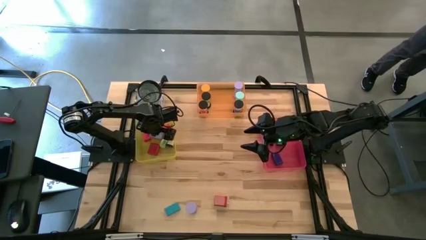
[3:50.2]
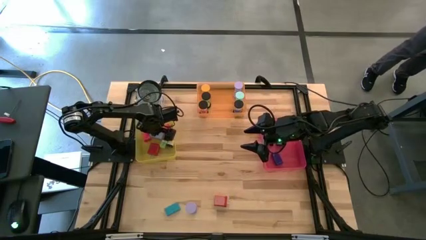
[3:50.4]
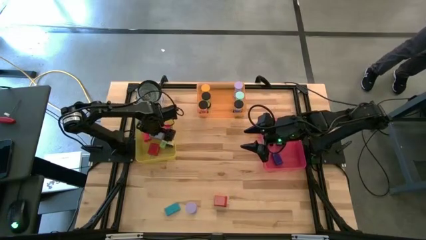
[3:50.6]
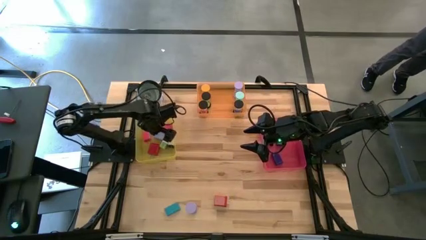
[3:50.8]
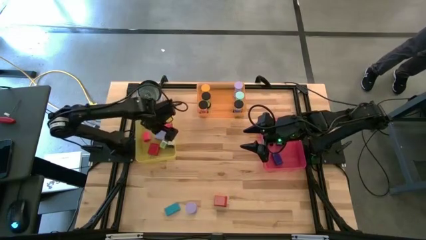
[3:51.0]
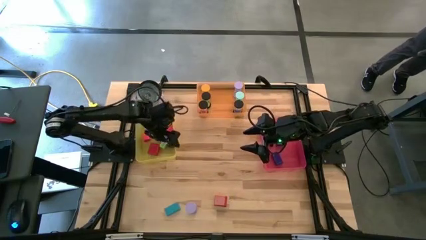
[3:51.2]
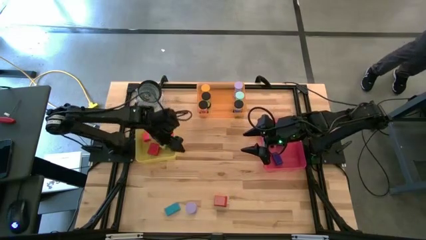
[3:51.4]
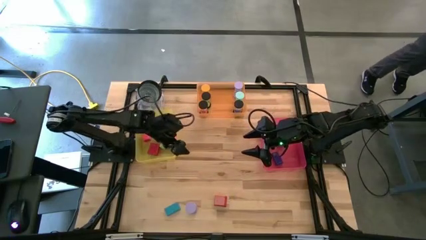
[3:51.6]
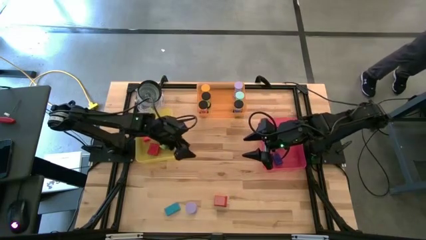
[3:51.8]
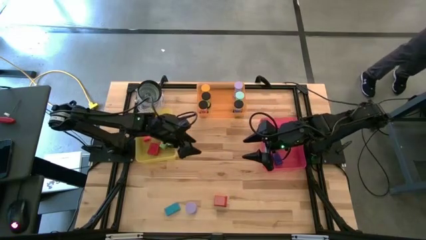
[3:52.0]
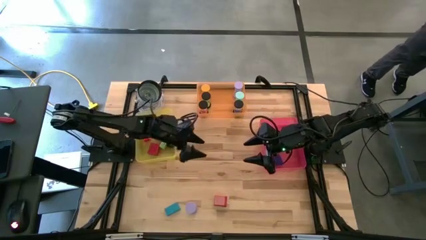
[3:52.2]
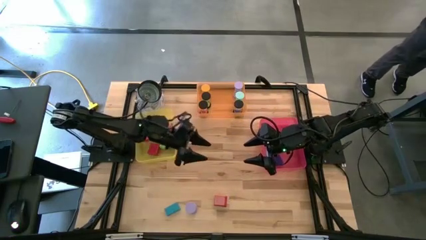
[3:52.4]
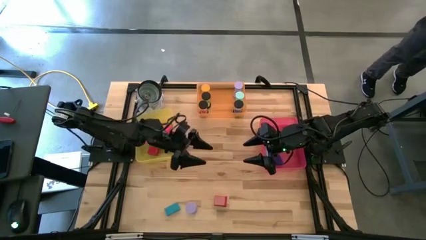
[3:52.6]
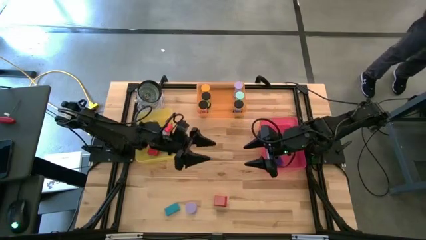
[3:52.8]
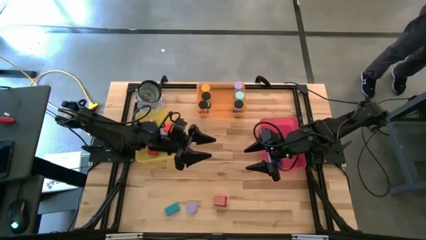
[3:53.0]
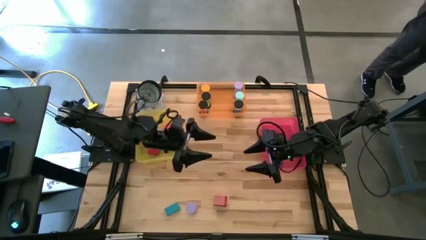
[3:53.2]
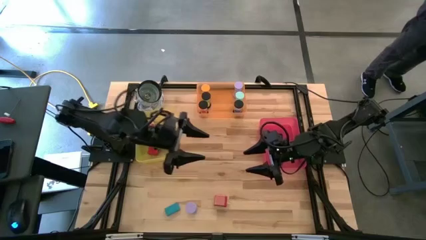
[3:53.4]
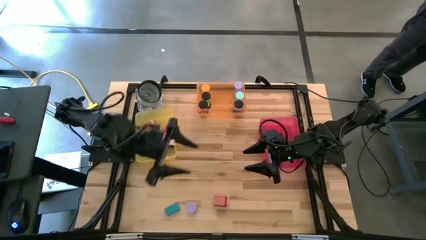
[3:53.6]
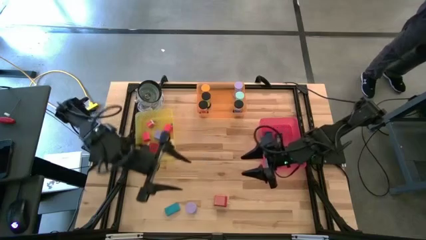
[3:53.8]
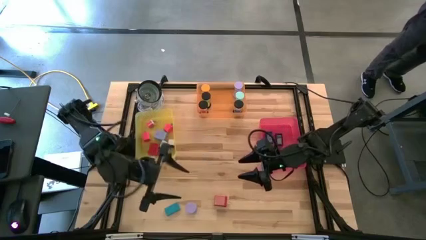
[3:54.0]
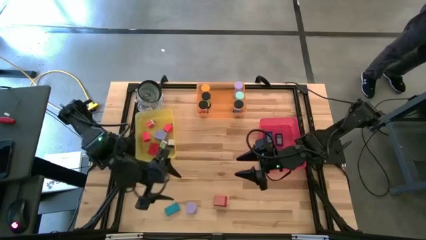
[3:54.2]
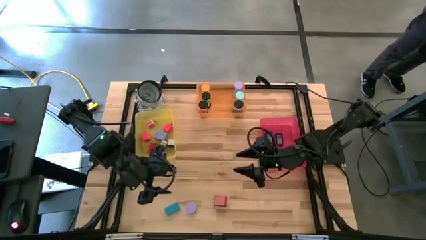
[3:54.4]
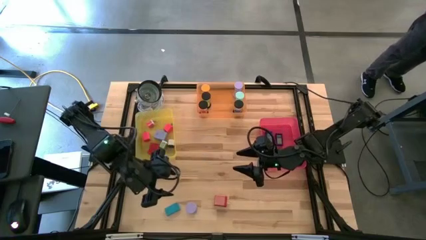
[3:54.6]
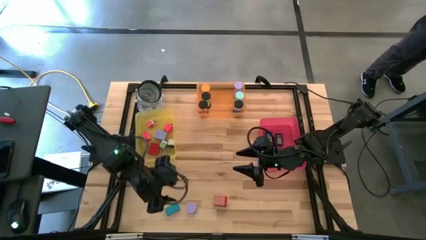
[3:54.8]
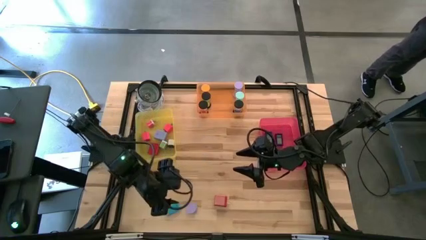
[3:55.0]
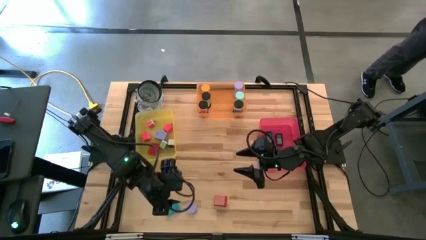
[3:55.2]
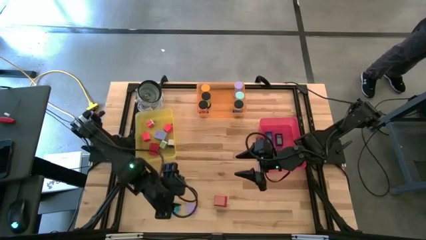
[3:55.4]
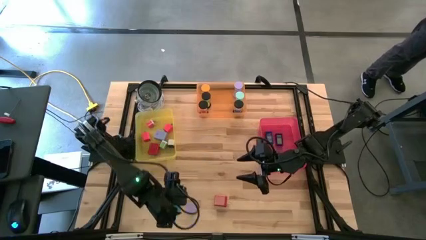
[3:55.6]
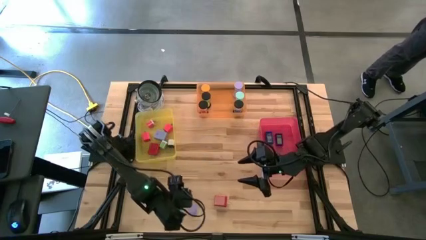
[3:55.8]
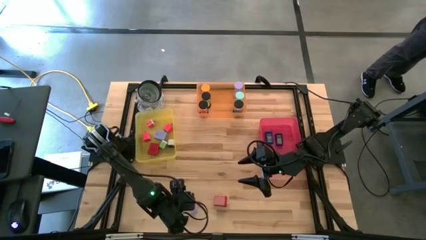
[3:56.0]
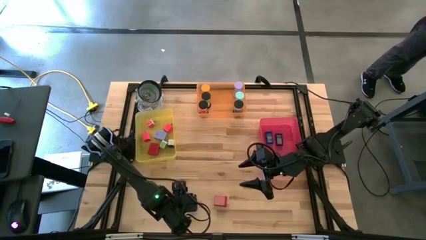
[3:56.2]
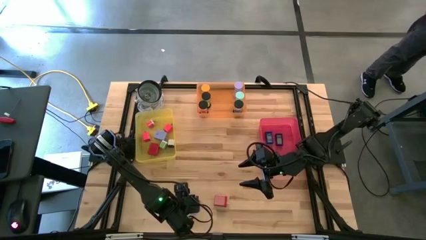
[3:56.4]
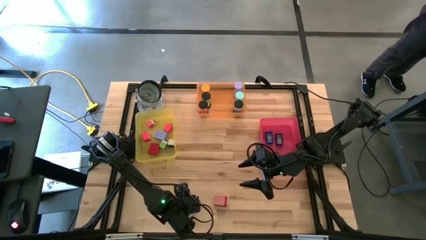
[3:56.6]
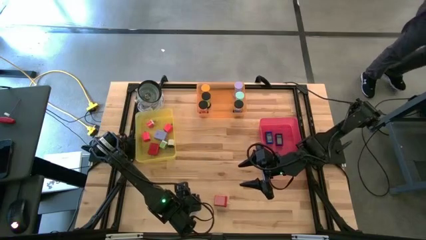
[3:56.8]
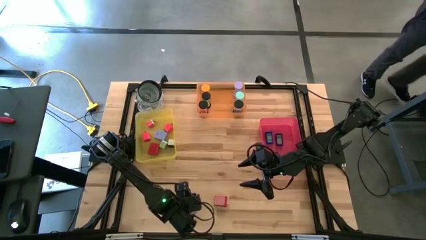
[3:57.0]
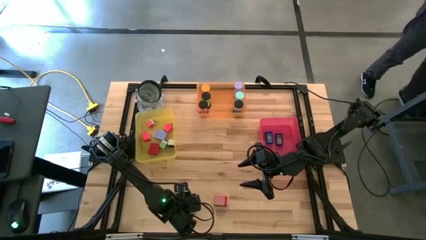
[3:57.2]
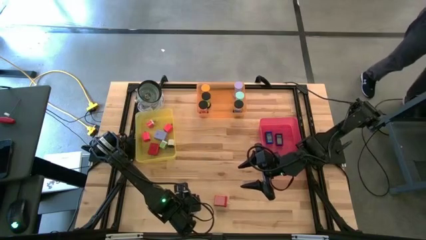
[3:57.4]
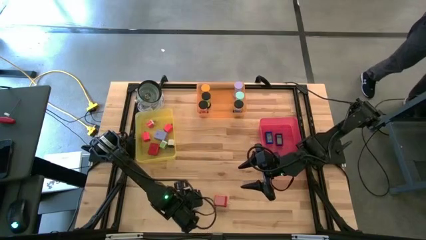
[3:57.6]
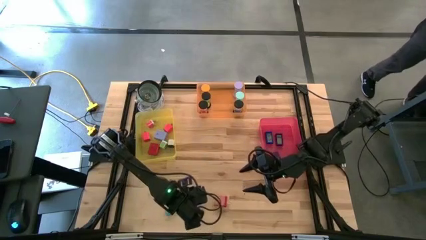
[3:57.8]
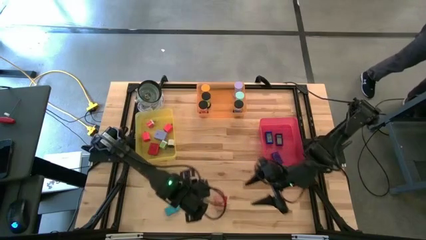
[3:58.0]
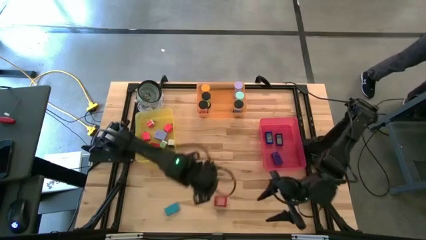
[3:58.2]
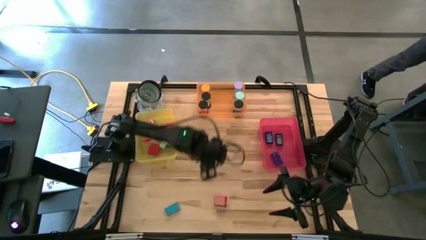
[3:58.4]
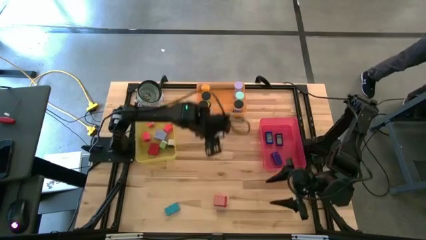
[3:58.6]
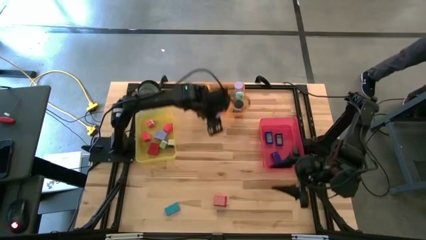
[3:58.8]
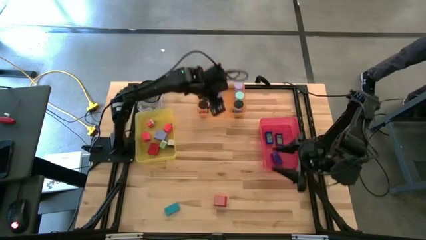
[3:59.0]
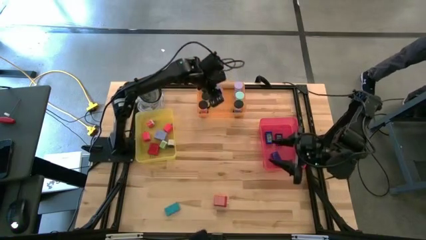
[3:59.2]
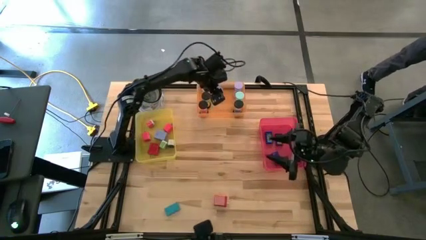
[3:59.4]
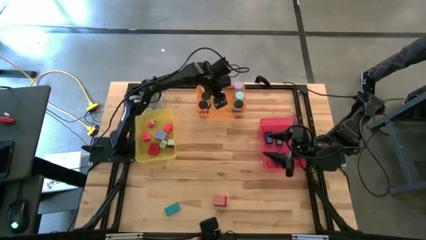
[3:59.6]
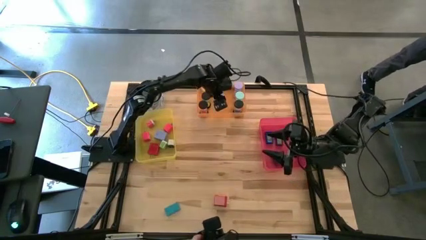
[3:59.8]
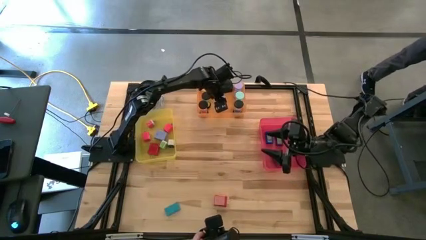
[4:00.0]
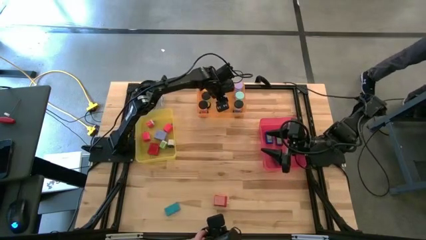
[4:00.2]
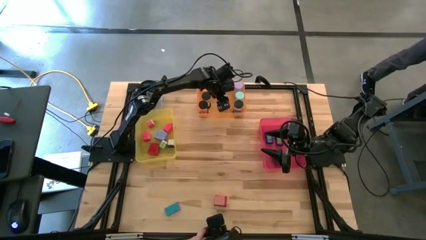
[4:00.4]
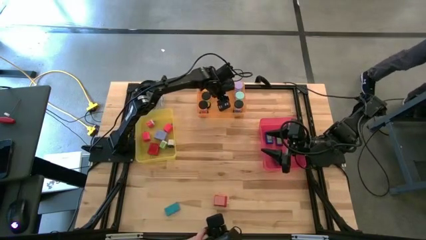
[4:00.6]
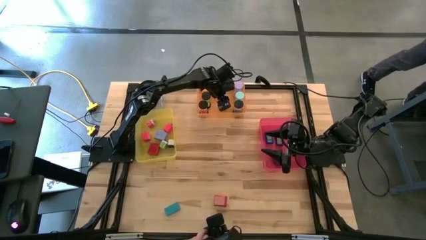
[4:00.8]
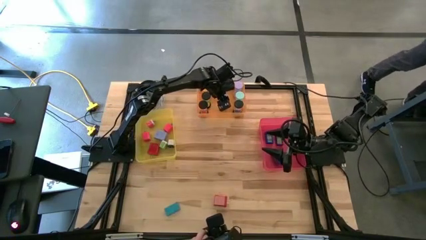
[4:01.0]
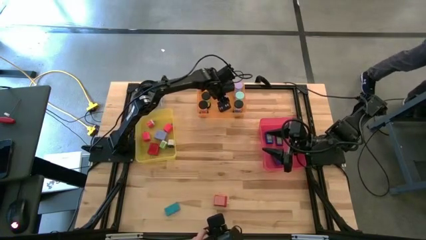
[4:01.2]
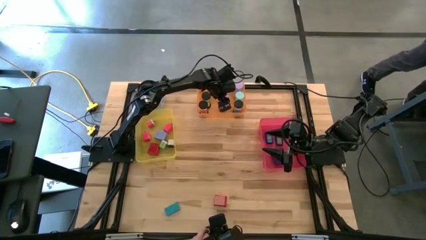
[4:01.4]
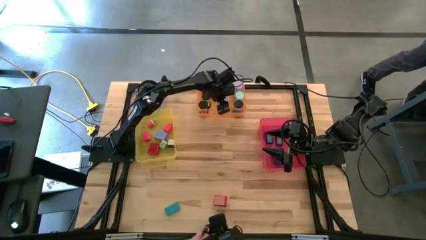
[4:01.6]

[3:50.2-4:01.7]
Task: Pick & Place Office items
Put the blue hourglass in the orange bin

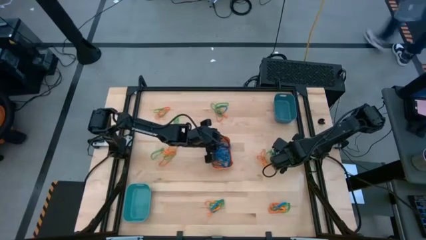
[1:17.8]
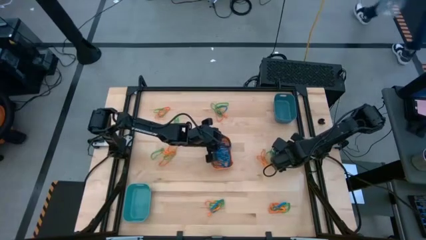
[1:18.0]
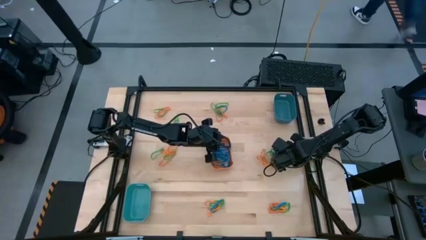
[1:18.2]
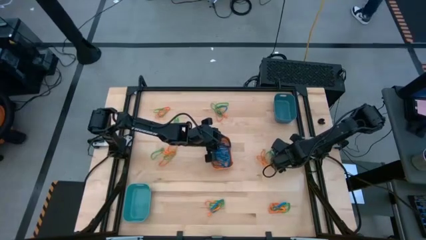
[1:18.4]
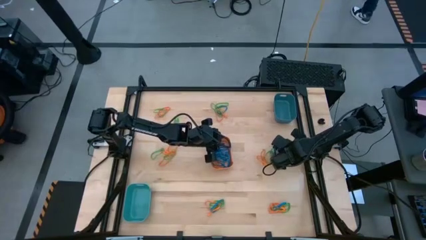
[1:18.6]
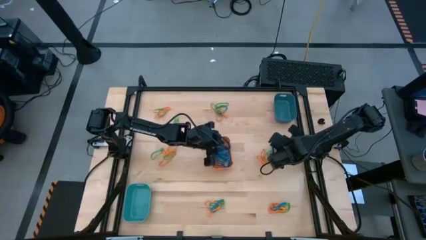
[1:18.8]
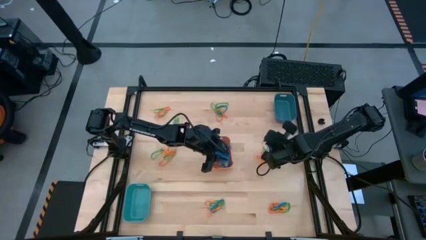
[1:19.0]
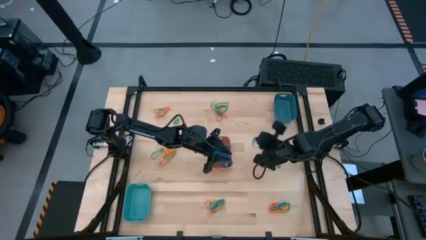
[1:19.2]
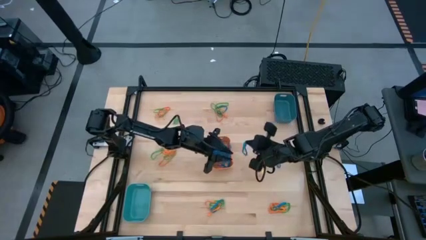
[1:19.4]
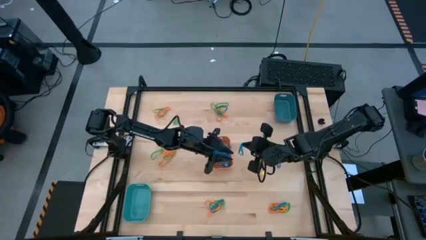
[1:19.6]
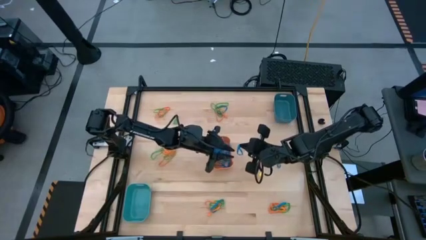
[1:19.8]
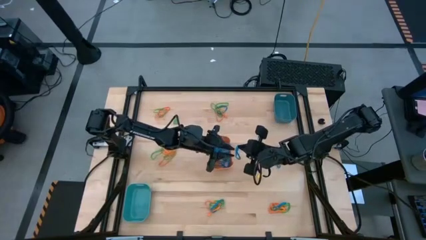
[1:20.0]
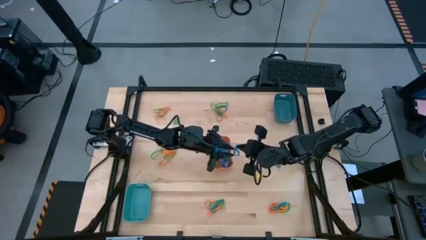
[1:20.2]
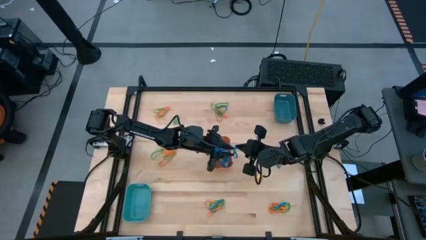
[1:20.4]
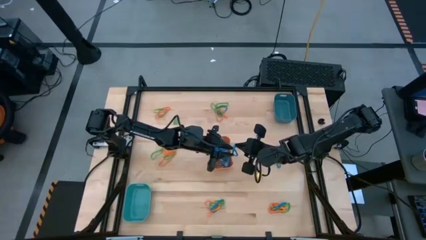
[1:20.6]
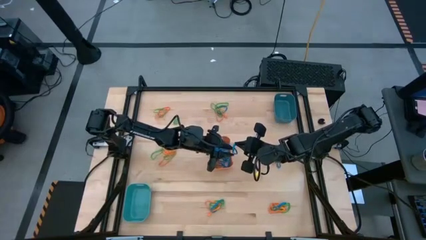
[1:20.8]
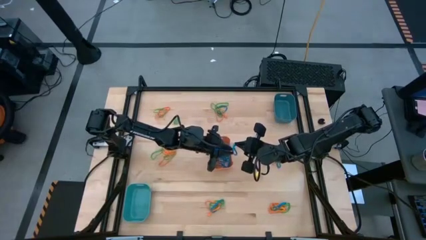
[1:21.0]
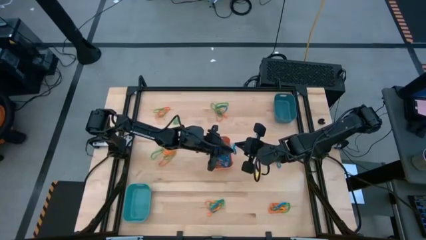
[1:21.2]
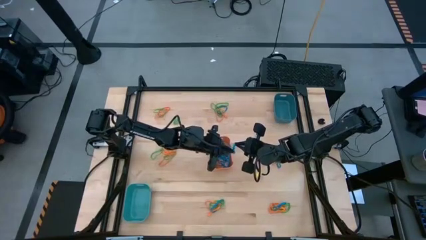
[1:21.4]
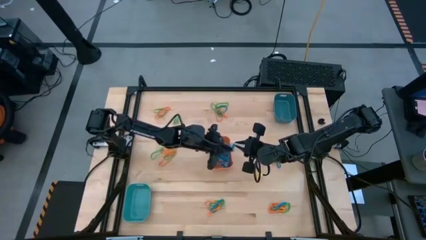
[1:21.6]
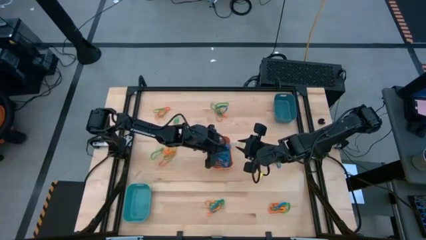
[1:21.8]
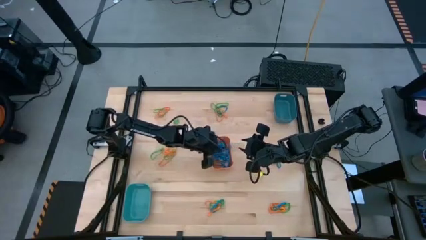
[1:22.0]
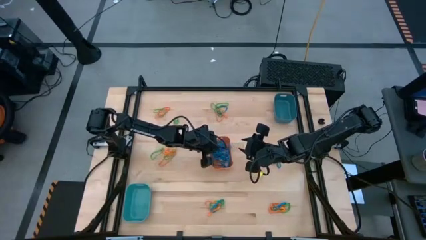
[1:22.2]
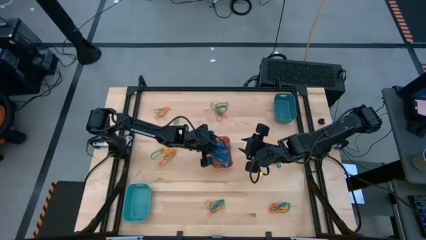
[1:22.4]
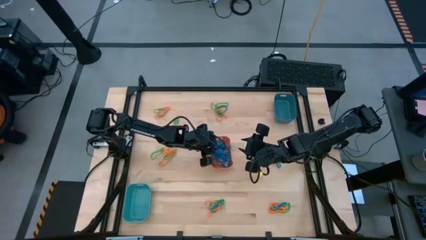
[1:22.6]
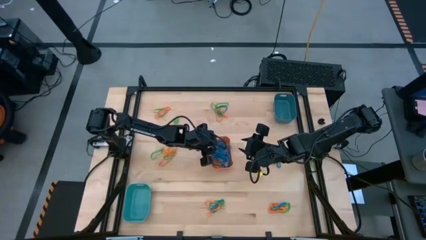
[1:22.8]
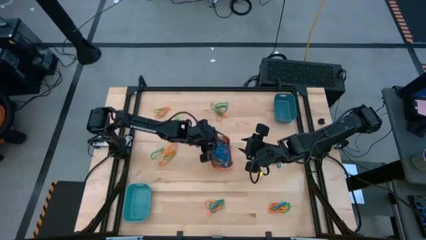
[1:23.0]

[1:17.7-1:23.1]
Task: Sort rubber bands into baskets
Put the blue rubber band into the orange bin
